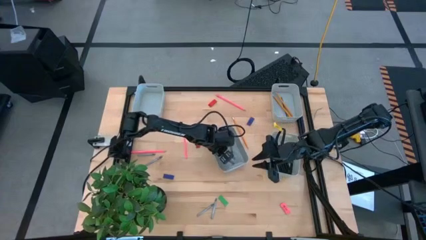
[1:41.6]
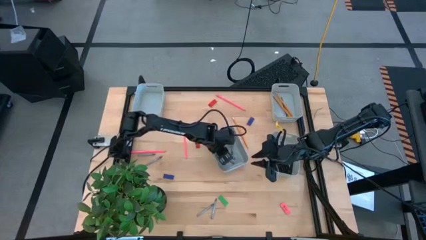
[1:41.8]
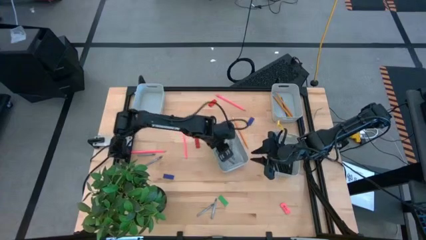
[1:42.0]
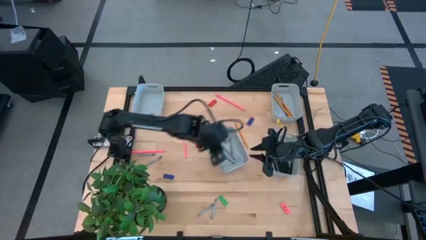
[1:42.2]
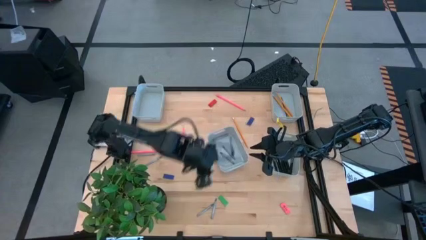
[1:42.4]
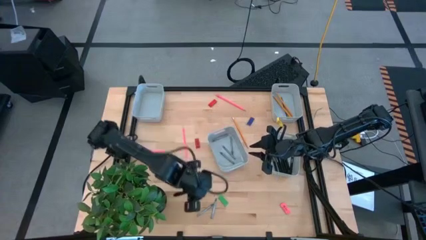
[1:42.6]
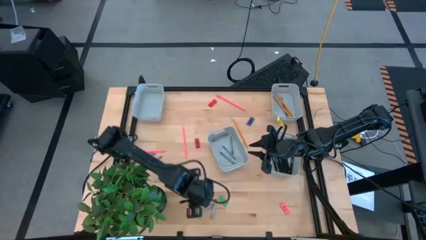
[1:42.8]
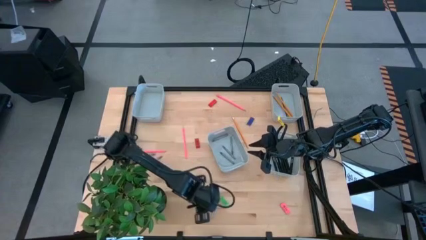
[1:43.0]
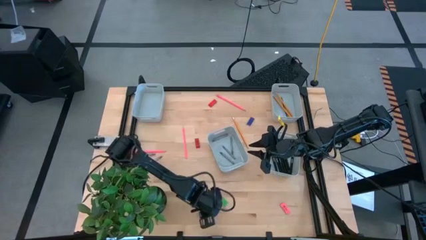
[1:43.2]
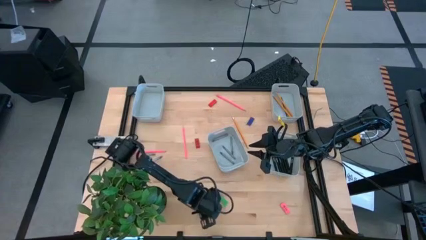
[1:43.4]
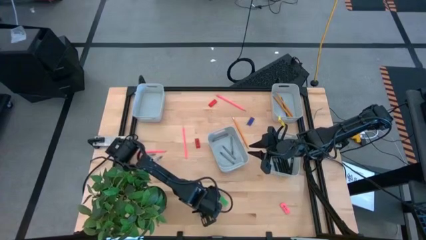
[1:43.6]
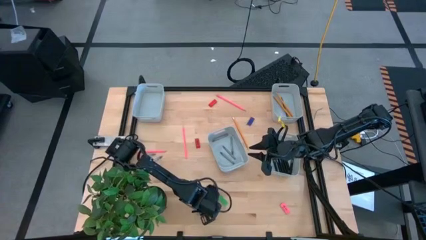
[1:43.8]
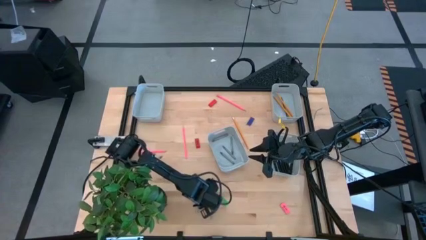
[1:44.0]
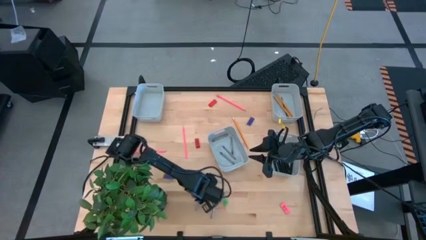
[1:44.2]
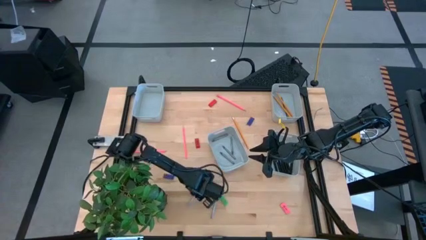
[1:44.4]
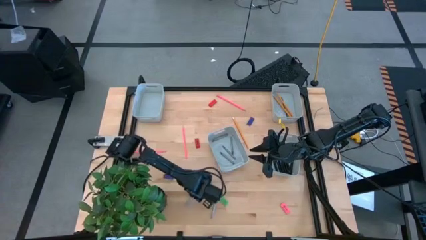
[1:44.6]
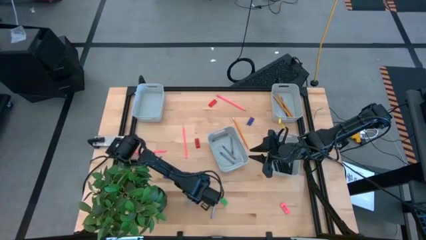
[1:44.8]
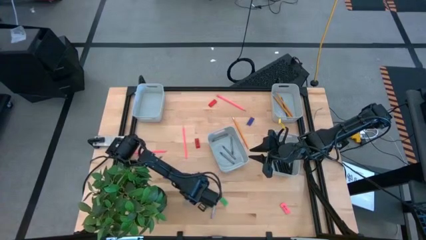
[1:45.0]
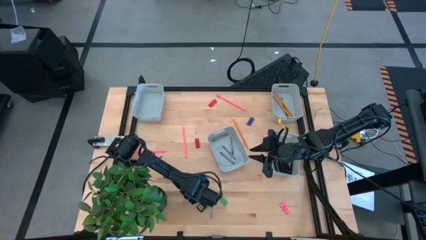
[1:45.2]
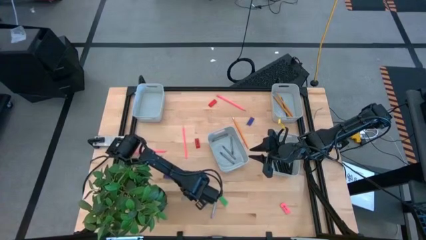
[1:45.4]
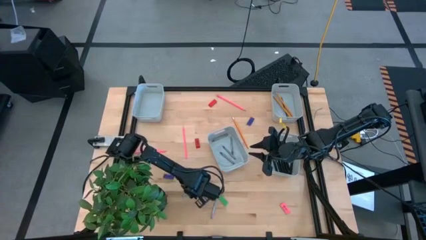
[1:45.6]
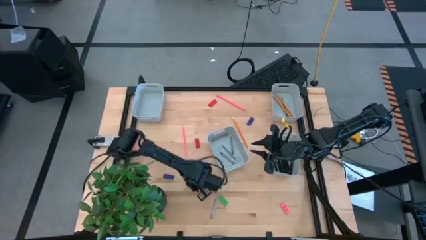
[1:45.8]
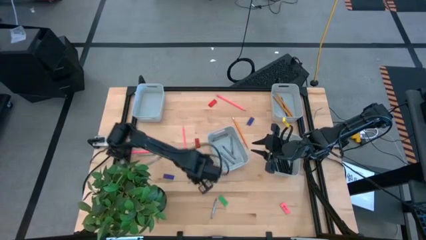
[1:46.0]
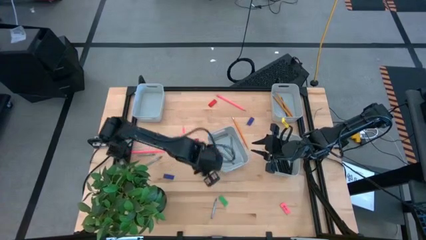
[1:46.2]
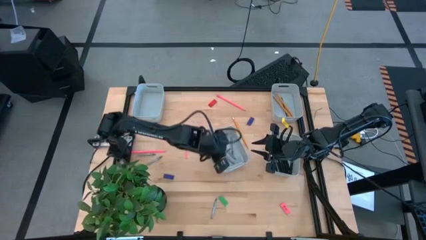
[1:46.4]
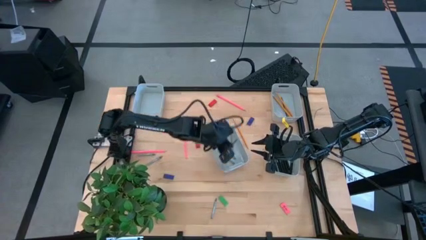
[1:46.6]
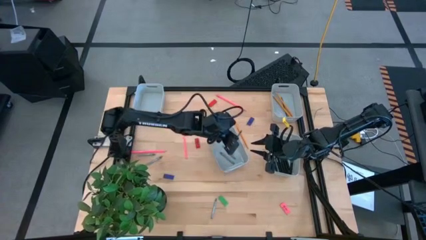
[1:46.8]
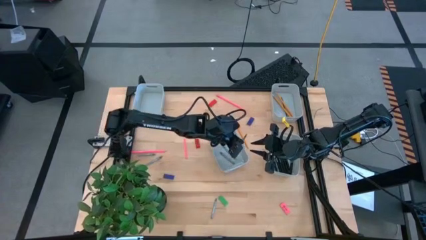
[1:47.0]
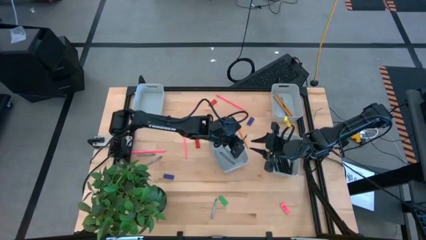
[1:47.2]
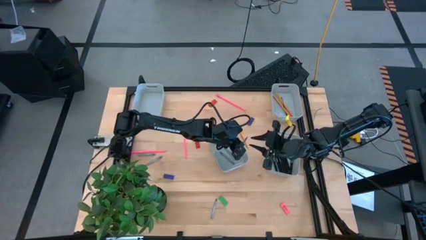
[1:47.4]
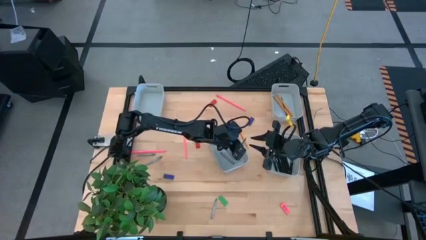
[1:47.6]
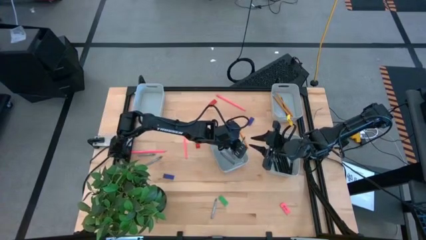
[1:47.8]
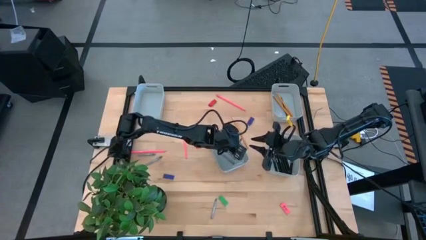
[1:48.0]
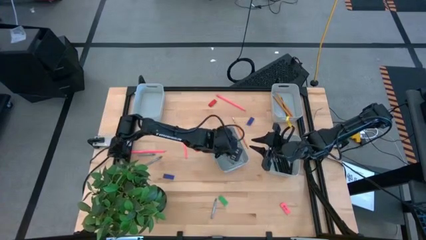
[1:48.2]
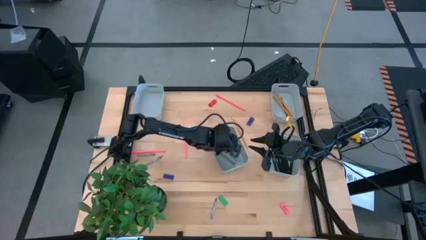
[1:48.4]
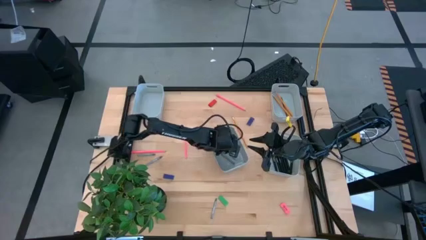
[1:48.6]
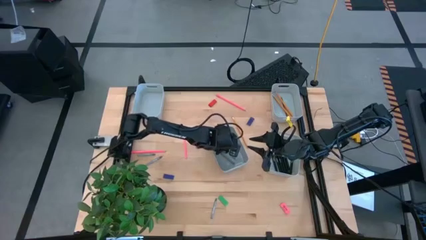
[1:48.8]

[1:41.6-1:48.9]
Task: Sort crayons/erasers/pens/pencils in bins
Put the gray crayon into the bottom left gray bin

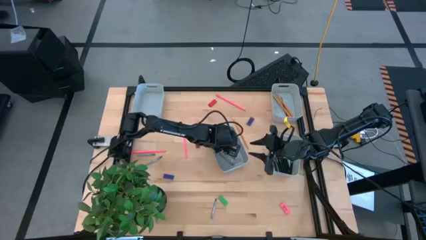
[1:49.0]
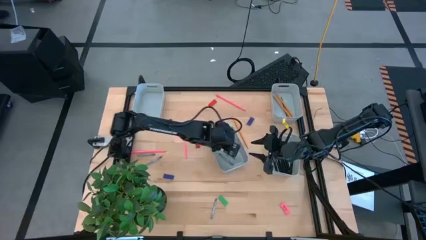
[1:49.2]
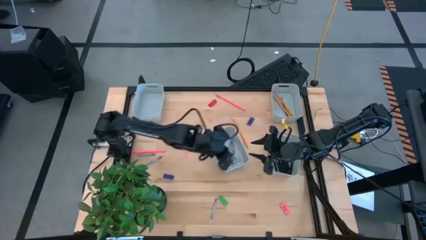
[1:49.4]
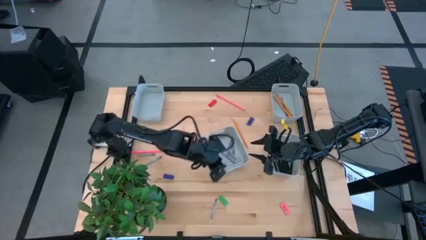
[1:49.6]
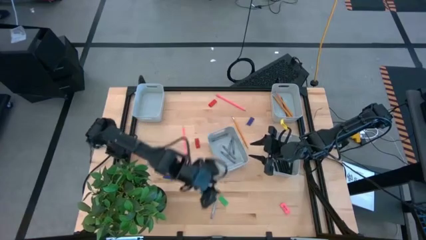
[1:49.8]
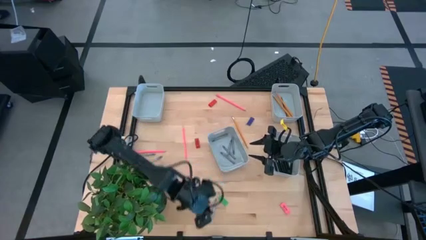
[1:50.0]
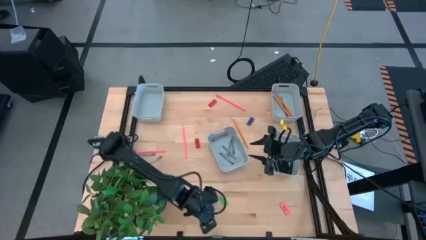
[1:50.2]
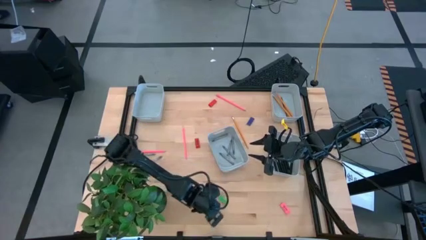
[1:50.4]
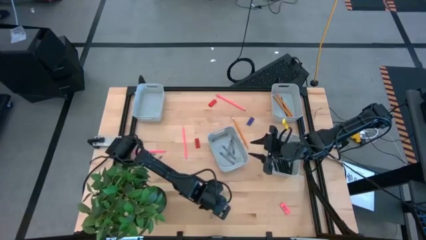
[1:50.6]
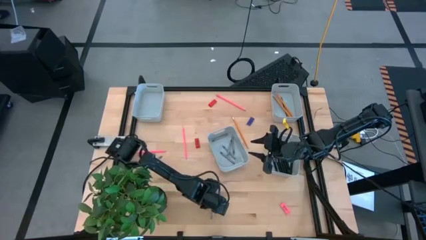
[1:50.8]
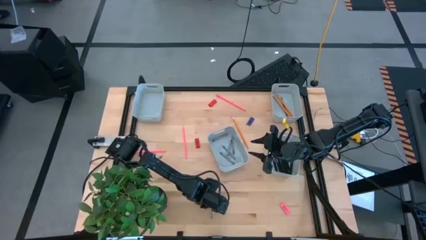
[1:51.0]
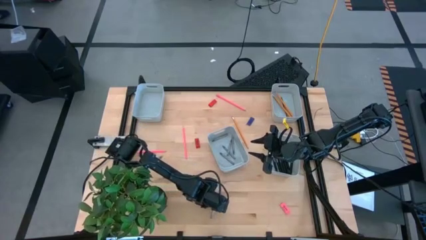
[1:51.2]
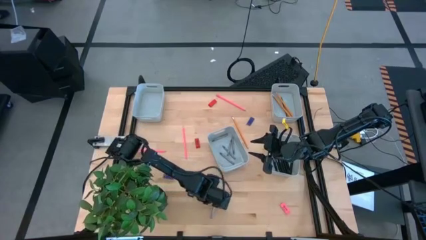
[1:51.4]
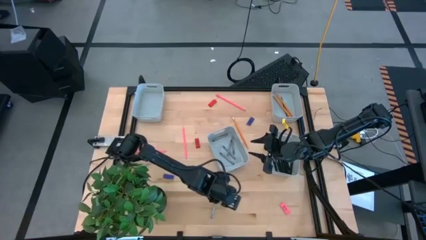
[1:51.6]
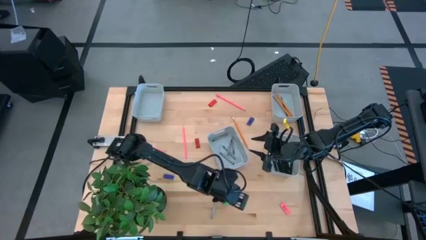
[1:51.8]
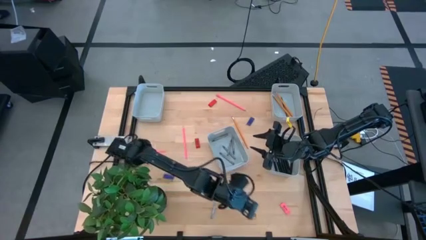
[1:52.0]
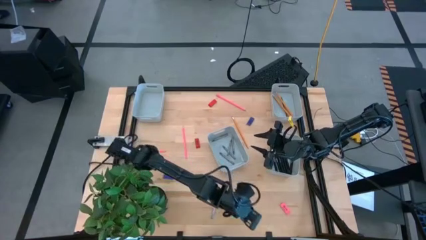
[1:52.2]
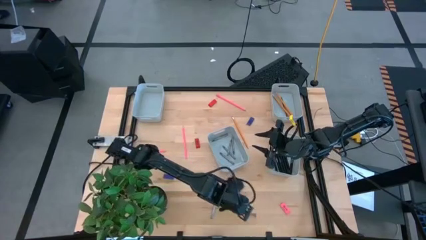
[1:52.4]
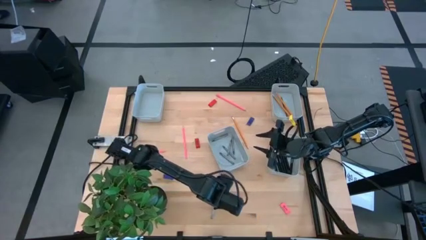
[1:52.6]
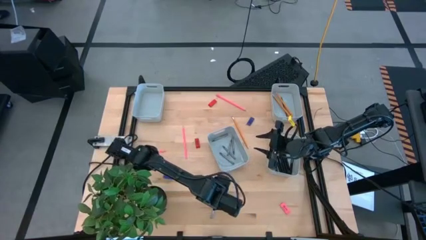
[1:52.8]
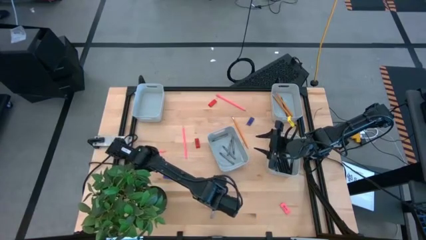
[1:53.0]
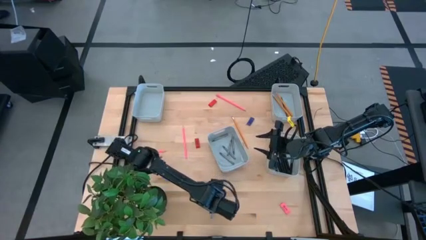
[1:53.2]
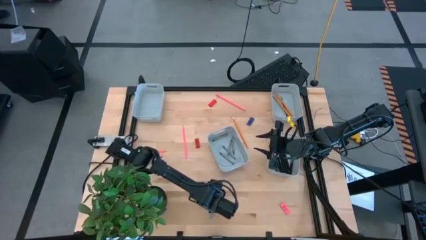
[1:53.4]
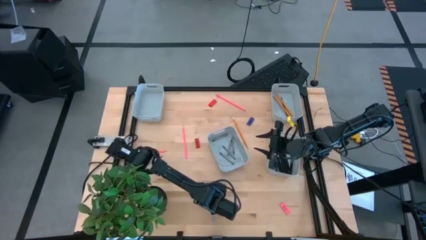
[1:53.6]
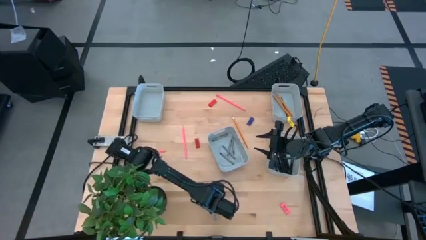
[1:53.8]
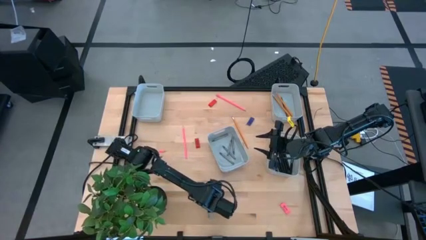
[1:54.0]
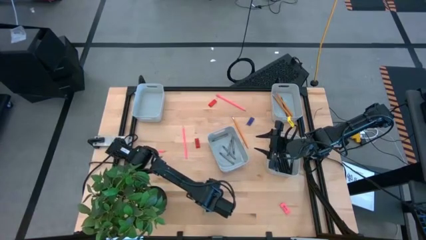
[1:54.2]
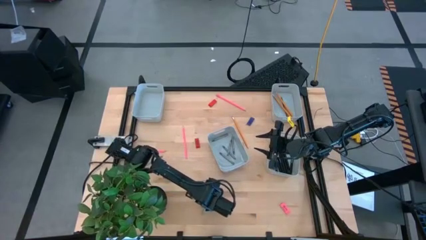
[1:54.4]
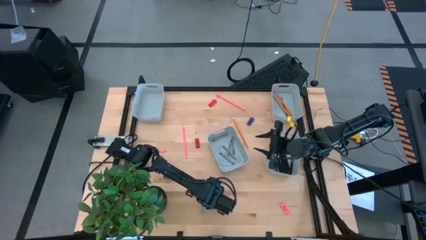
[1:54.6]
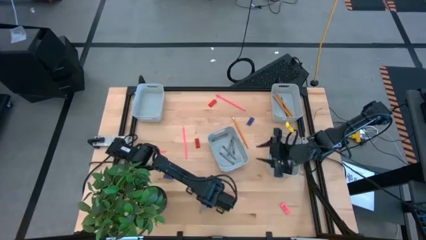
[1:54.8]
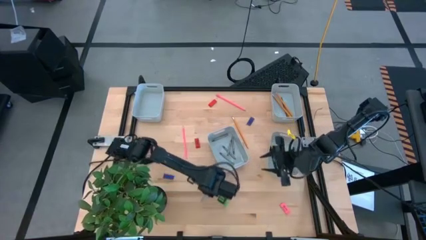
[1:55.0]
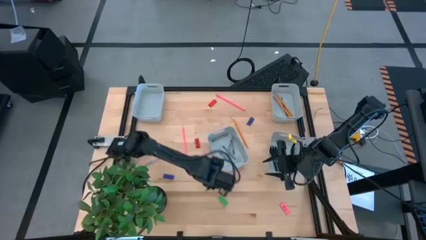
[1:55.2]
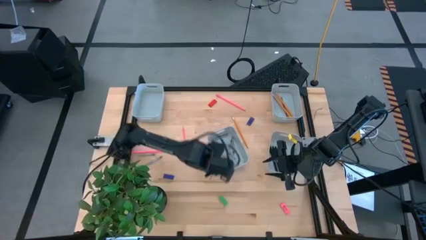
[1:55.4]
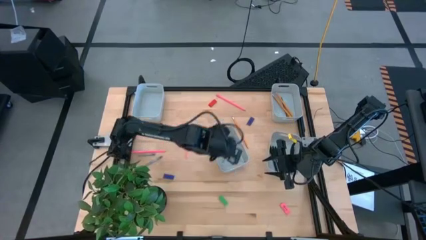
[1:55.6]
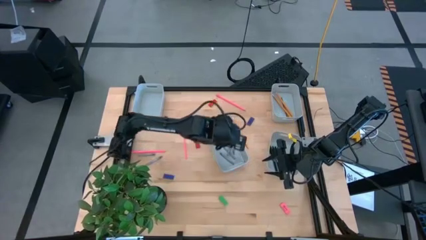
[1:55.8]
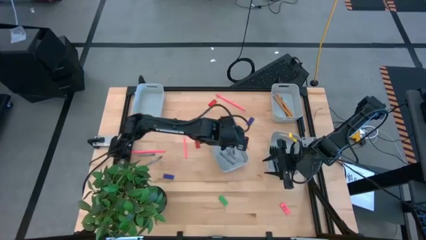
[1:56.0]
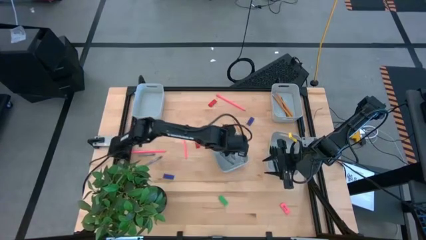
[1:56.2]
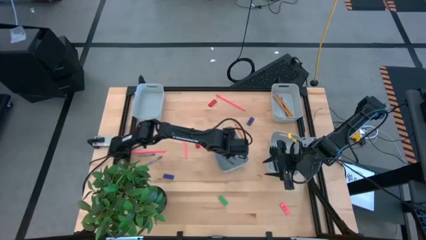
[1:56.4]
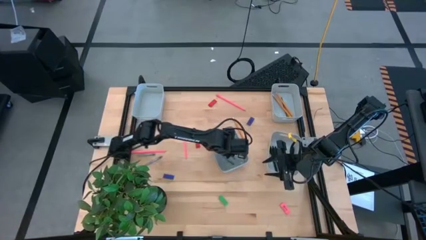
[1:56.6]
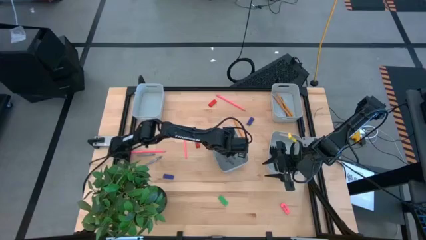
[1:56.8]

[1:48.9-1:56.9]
Put the gray crayon into the bottom left gray bin
